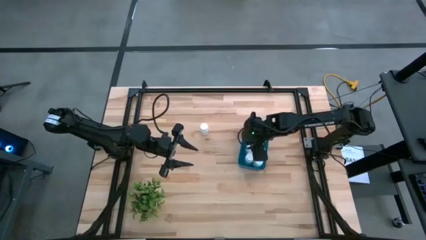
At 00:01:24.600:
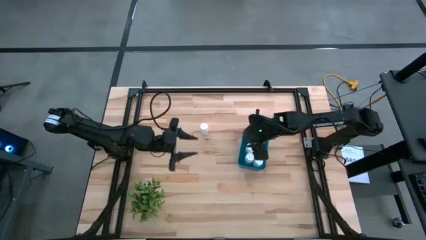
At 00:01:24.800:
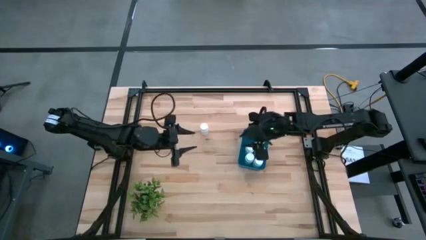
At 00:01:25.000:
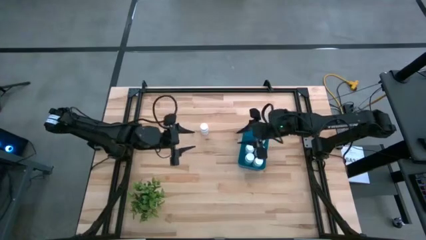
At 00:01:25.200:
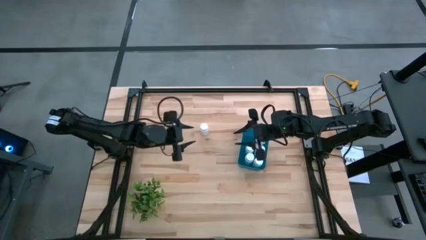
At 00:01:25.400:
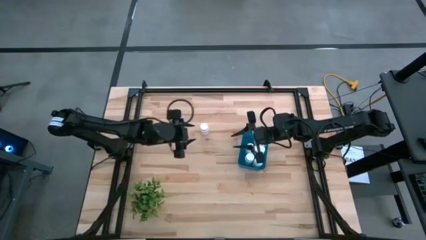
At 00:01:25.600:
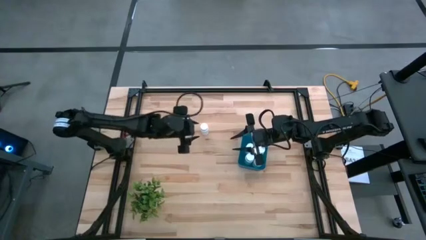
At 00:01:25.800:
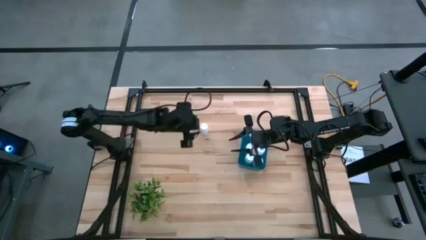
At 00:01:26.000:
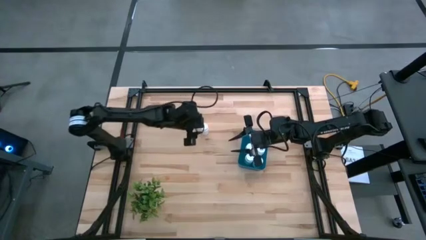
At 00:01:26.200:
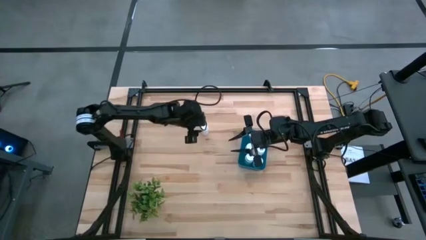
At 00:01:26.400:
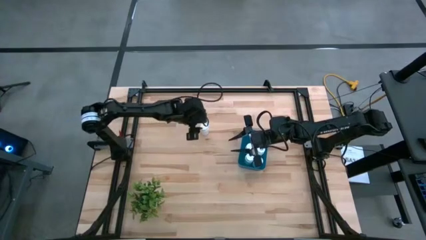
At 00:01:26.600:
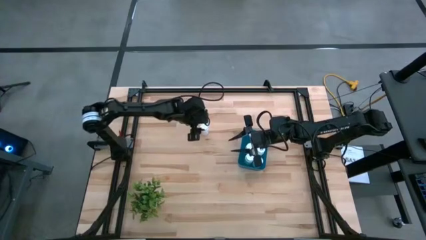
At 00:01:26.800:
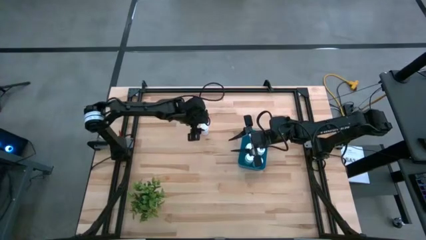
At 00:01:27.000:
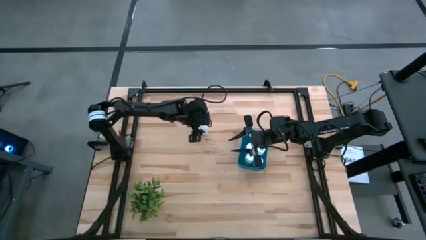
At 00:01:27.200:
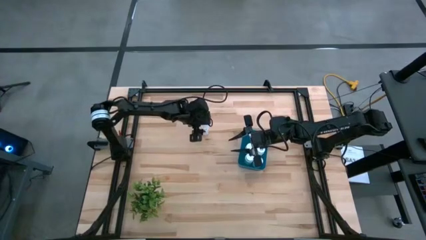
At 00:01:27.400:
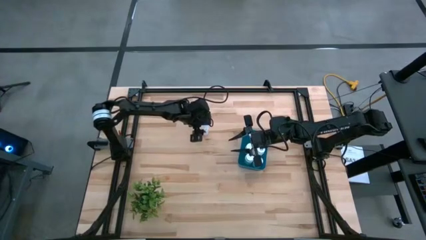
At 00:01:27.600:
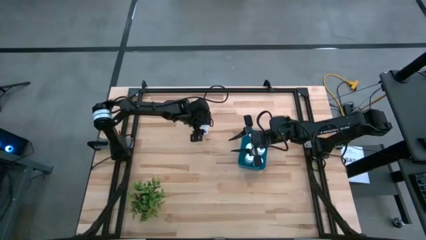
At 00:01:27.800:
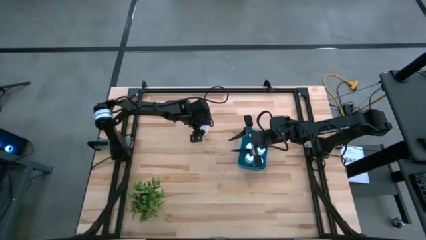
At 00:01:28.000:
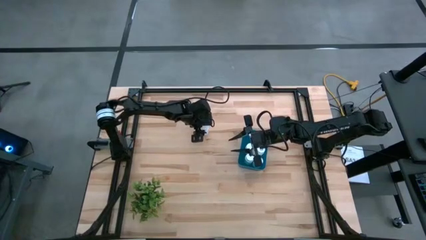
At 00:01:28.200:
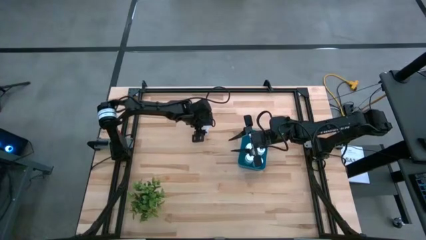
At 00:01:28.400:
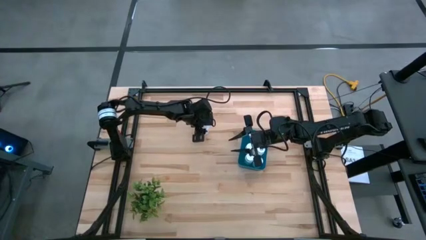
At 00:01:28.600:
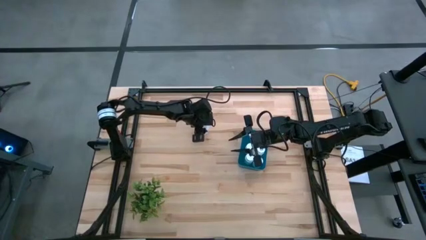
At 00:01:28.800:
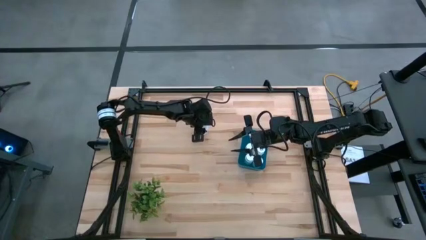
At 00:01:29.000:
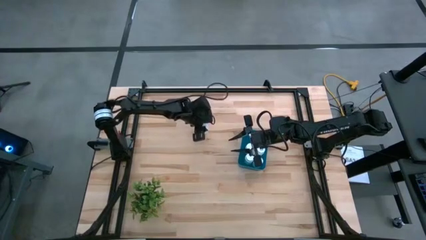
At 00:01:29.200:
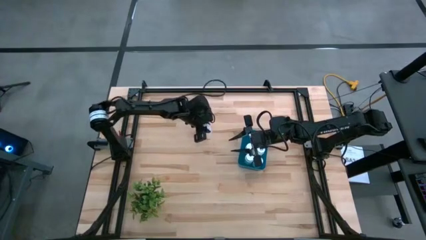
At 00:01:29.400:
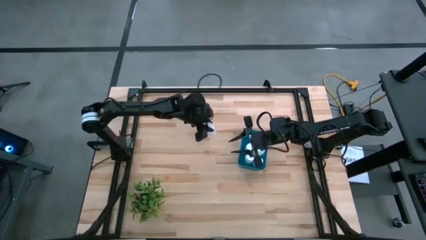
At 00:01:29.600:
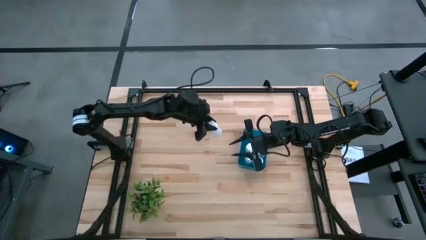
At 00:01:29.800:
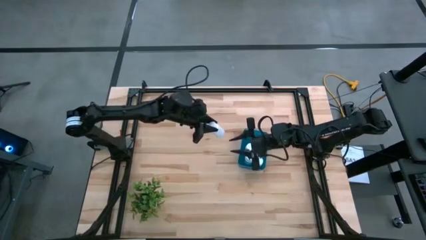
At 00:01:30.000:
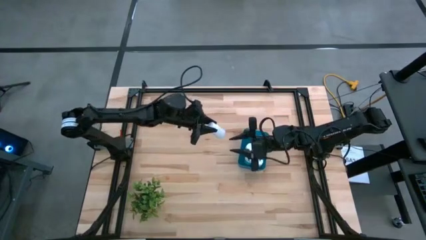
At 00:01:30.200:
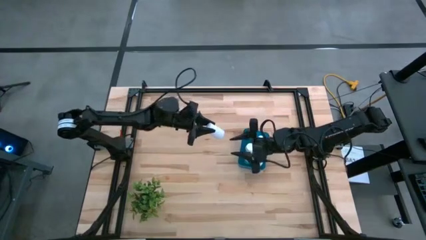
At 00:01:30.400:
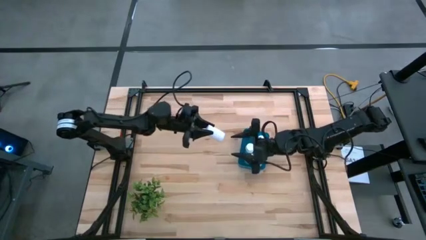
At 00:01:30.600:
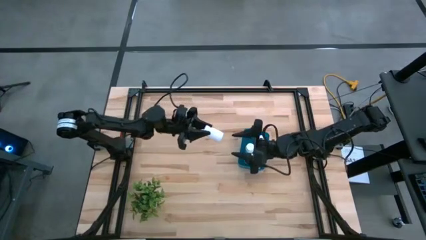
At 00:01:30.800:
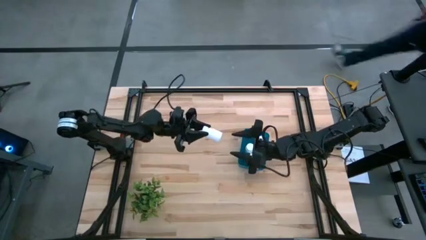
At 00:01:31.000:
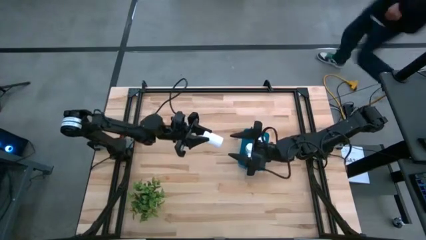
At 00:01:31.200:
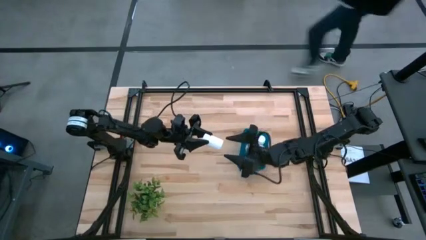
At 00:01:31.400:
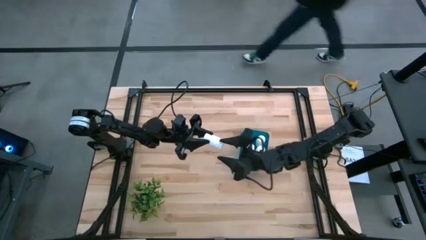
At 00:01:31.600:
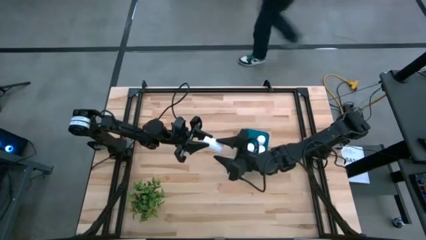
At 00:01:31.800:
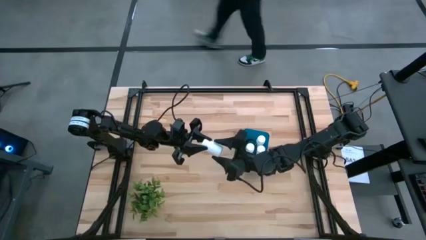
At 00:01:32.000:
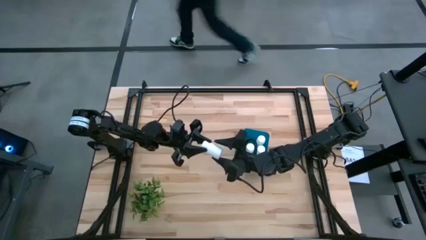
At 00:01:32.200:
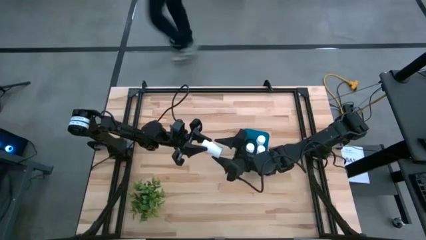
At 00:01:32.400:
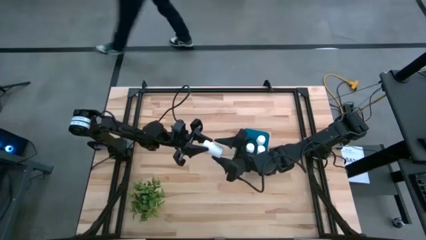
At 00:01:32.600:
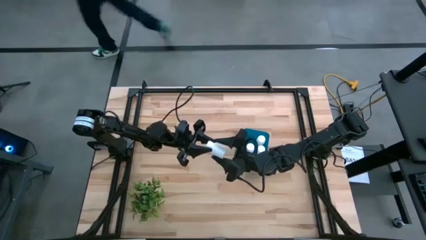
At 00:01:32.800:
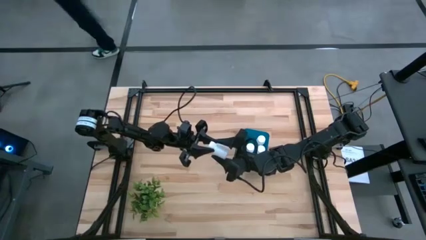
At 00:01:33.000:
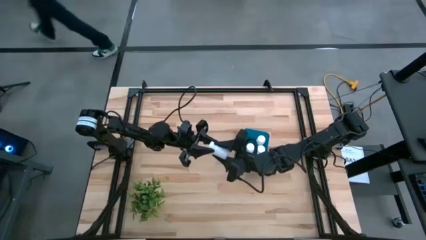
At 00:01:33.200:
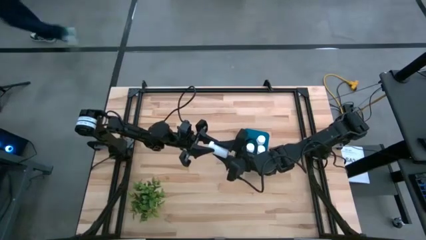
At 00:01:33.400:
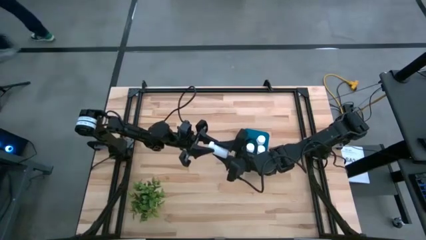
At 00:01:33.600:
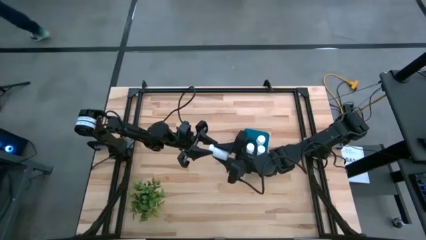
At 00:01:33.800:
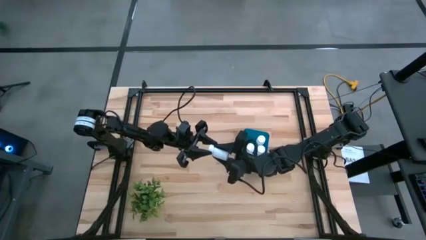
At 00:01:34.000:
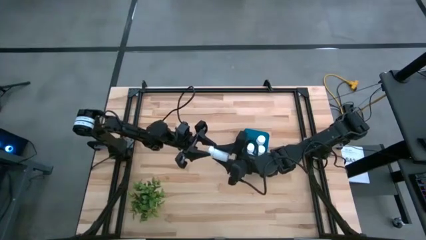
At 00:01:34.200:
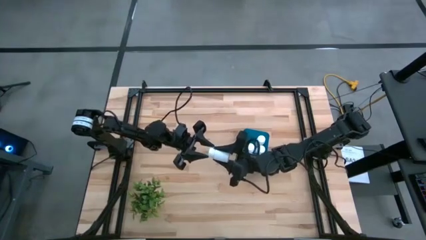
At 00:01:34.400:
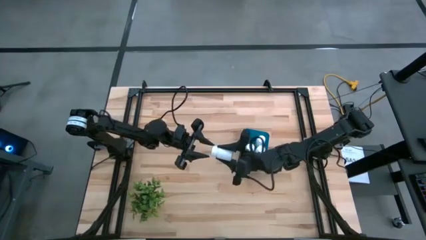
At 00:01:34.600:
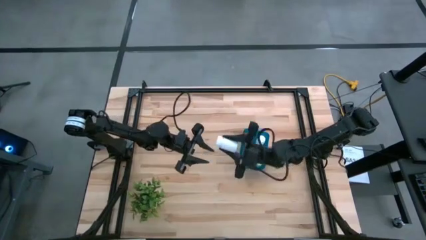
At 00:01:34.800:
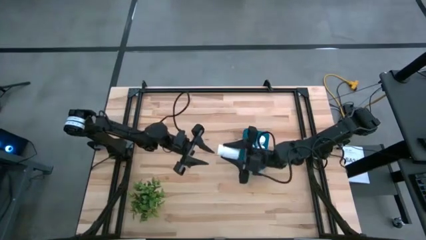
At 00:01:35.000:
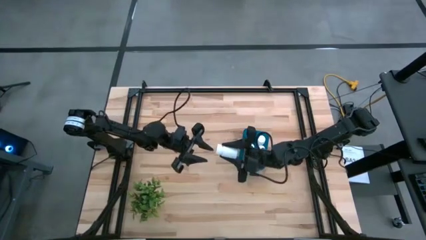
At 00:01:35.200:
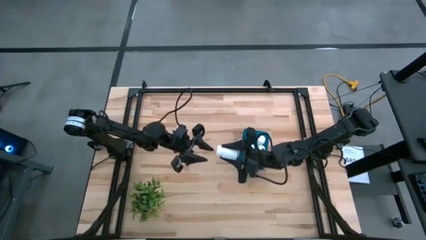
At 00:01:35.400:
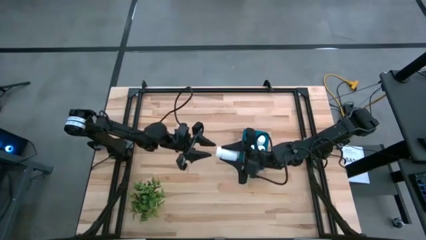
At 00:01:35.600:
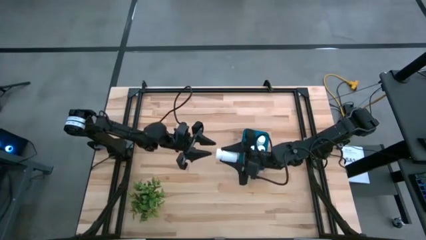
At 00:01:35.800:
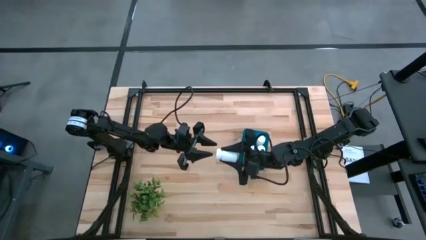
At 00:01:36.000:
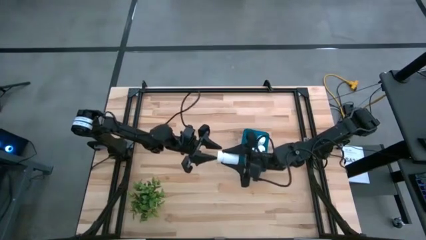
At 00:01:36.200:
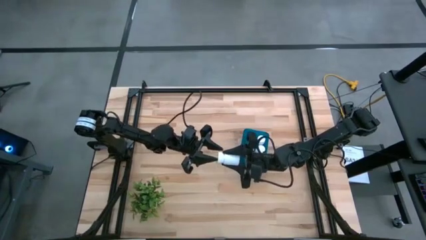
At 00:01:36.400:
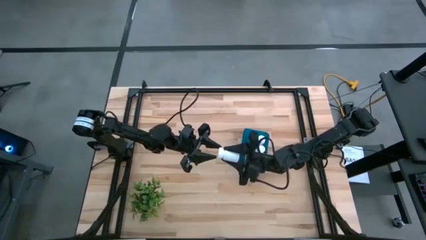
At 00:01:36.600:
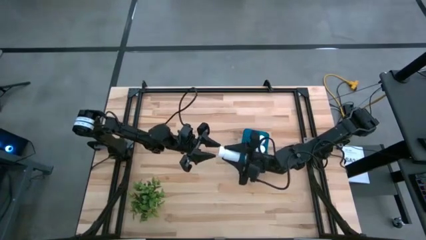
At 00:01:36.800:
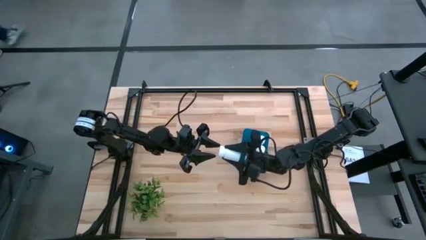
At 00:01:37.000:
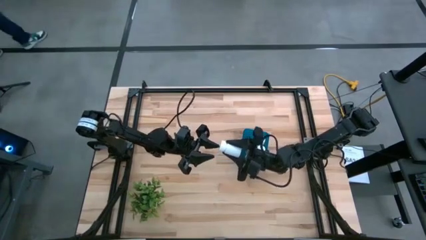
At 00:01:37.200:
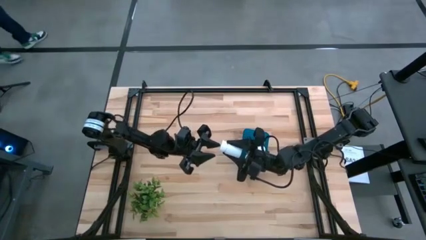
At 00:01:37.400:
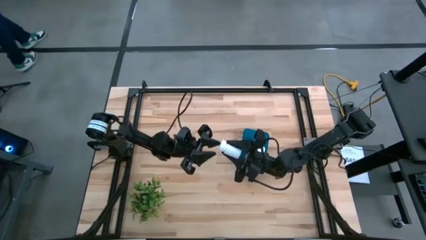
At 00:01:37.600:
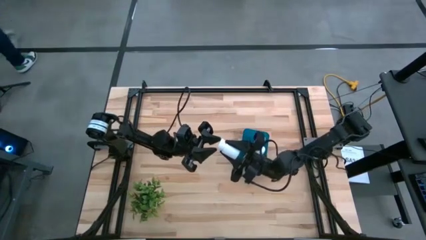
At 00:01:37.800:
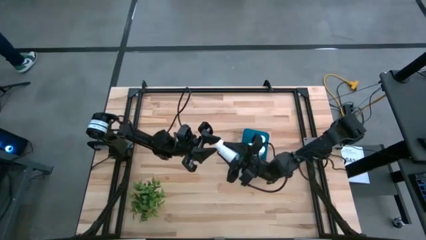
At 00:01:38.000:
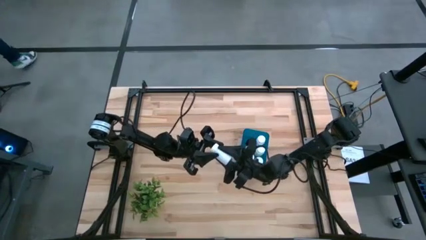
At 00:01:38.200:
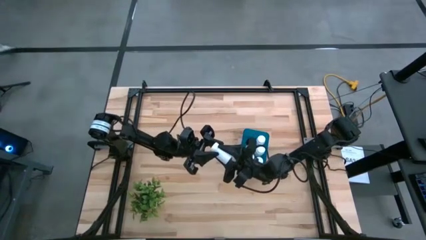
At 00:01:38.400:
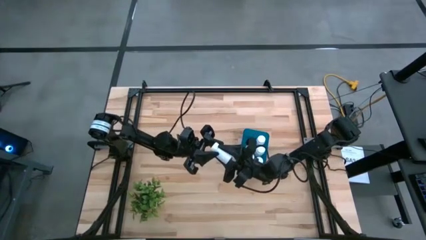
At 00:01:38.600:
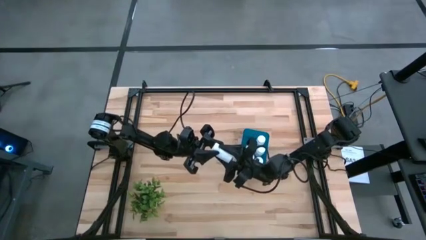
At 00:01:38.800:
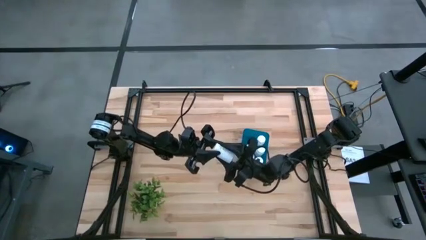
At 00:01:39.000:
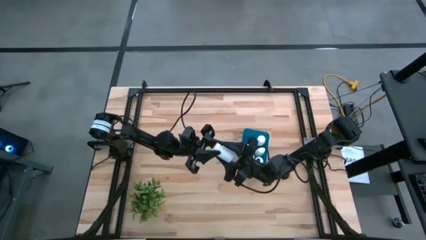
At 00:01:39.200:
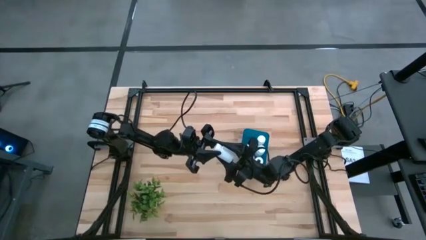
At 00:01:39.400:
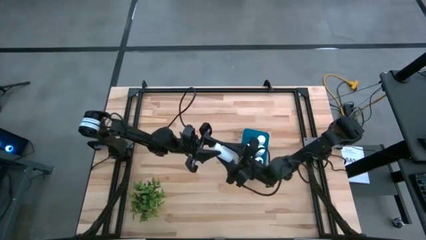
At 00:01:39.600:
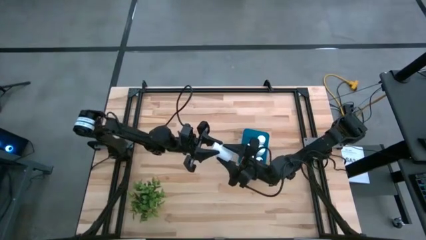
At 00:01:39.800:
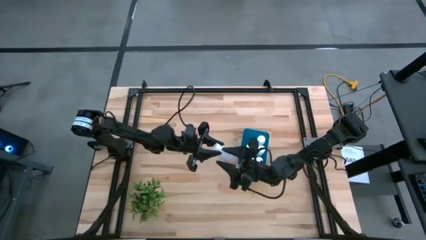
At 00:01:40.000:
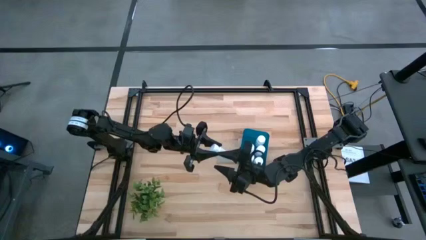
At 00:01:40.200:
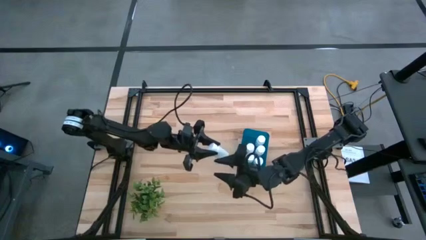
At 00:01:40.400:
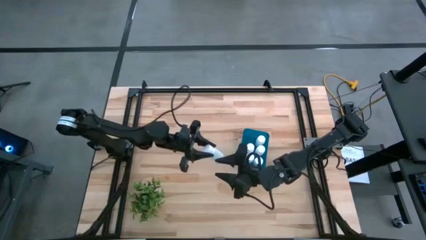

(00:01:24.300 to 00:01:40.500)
Task: Pick and place pill bottles into a basket
Put the white medicine bottle into the blue bin
